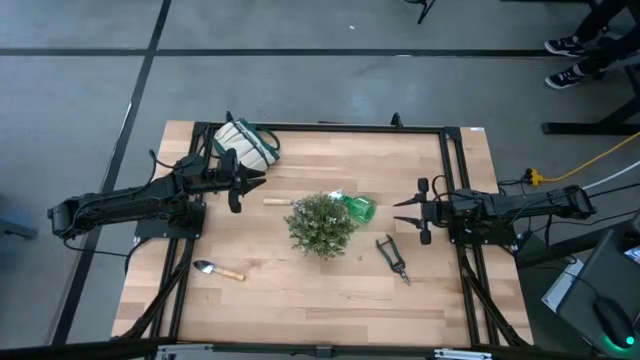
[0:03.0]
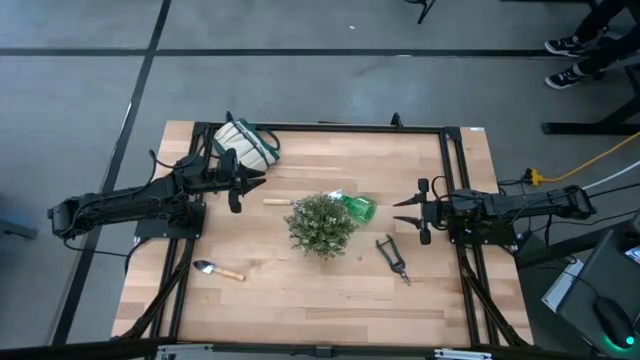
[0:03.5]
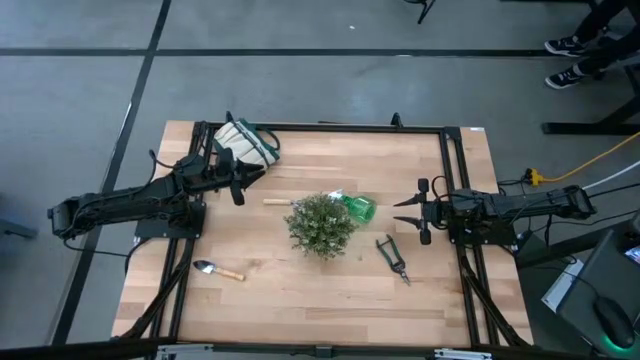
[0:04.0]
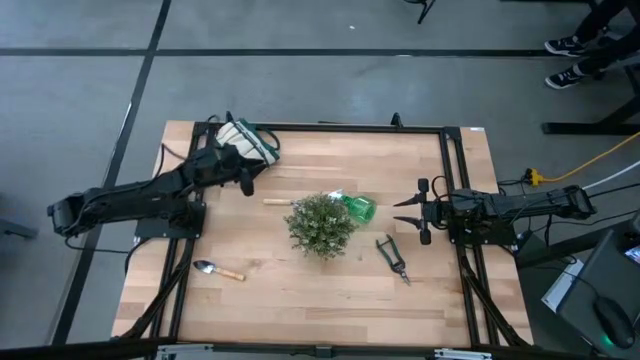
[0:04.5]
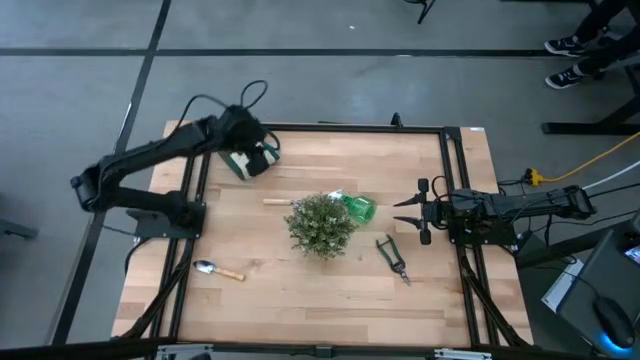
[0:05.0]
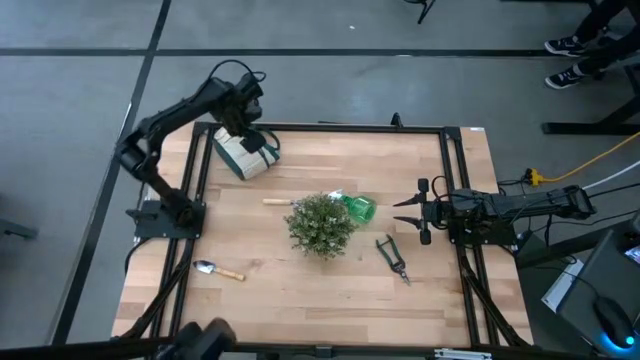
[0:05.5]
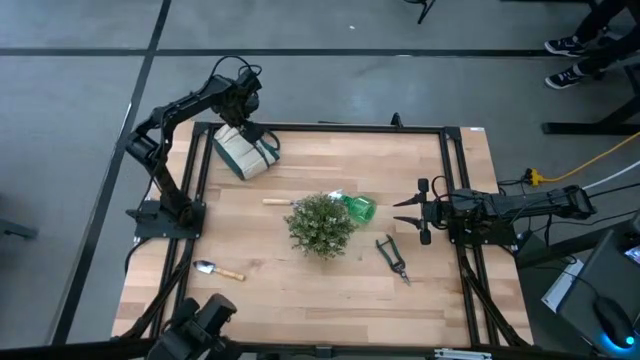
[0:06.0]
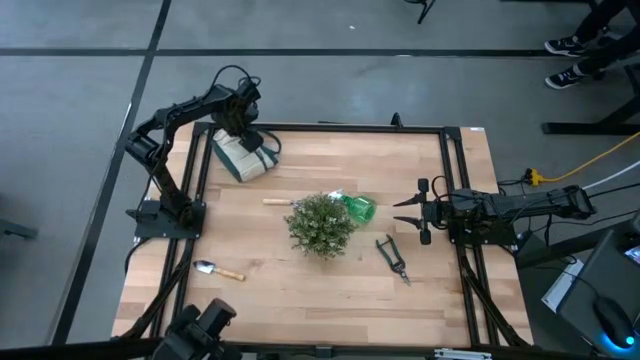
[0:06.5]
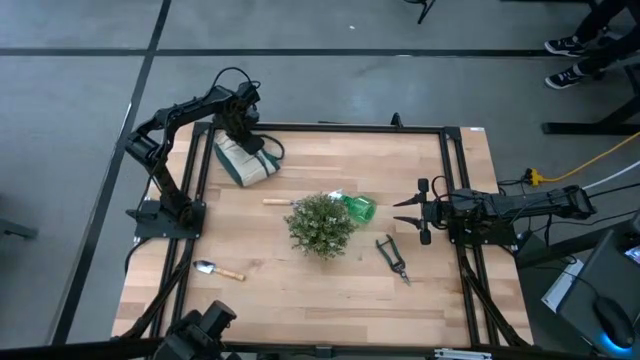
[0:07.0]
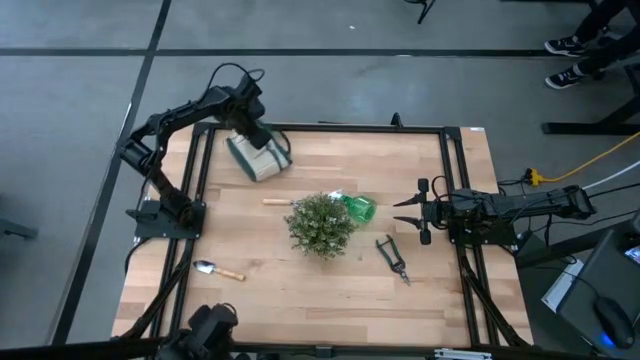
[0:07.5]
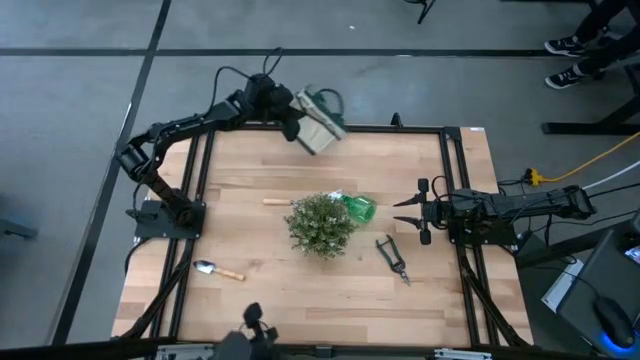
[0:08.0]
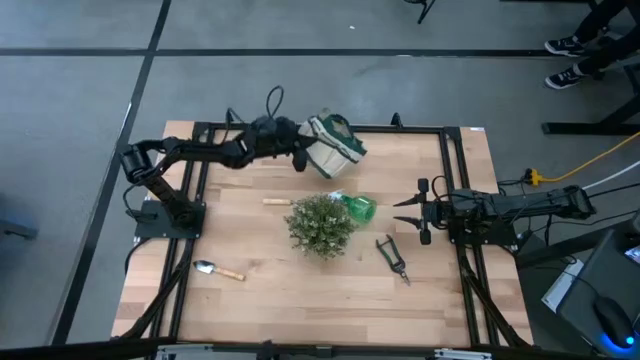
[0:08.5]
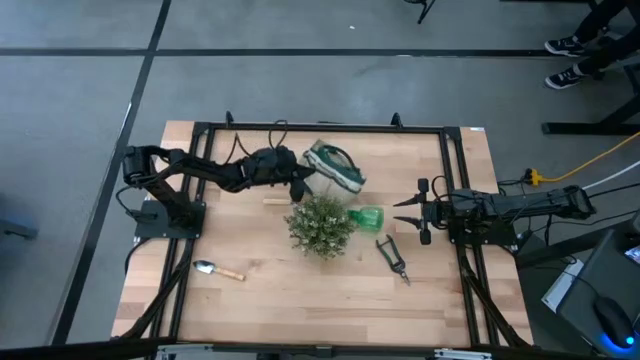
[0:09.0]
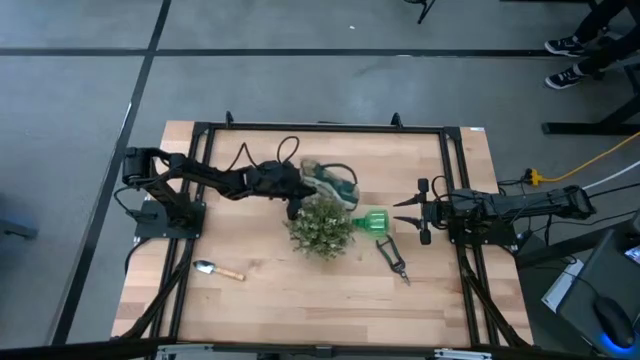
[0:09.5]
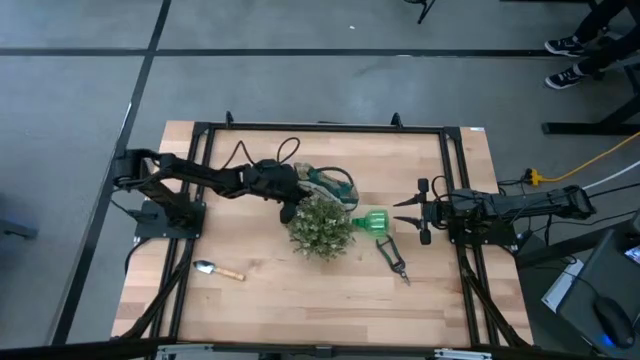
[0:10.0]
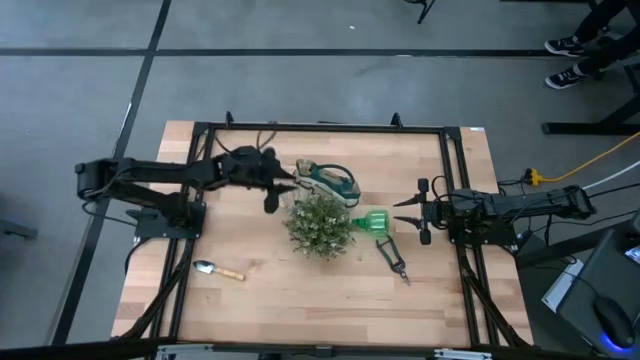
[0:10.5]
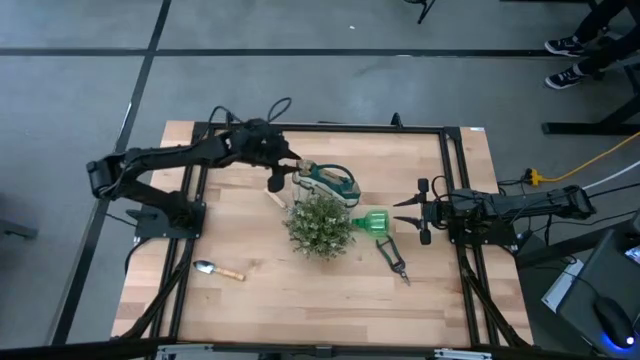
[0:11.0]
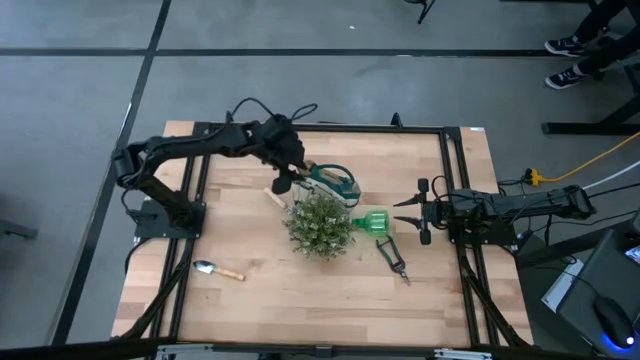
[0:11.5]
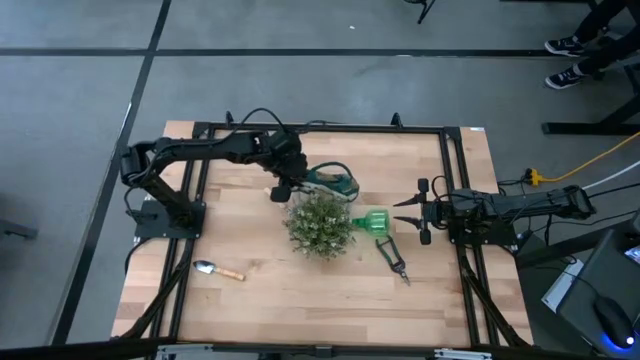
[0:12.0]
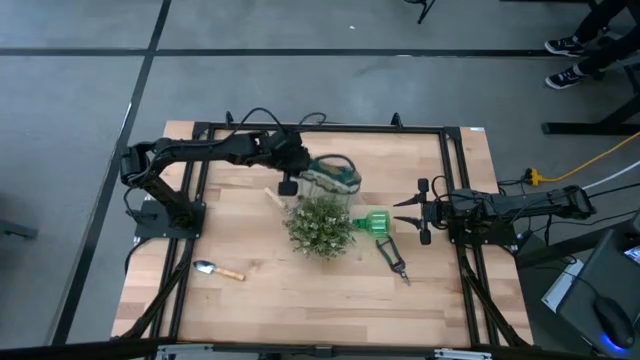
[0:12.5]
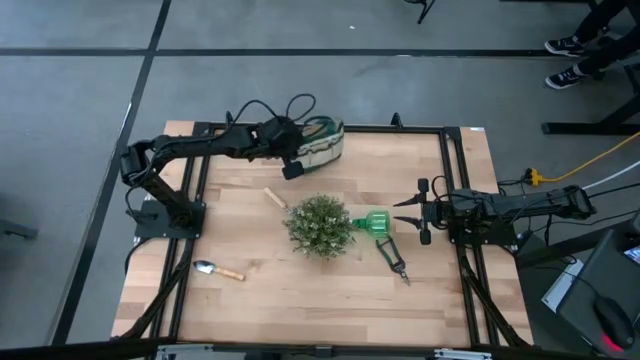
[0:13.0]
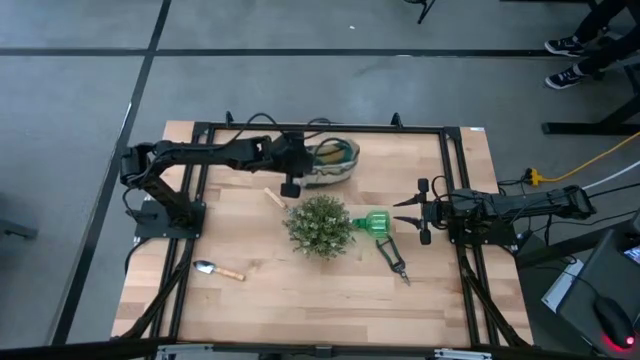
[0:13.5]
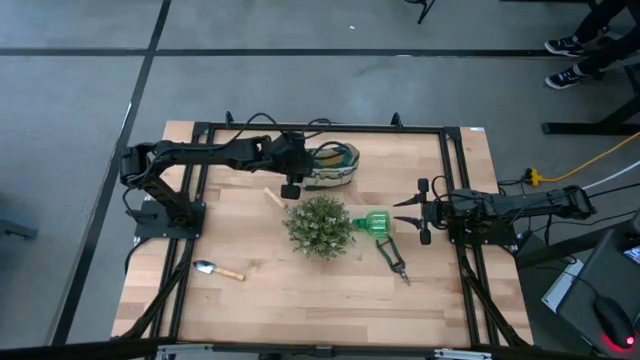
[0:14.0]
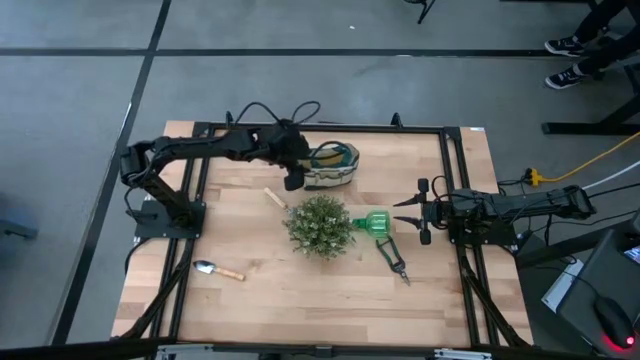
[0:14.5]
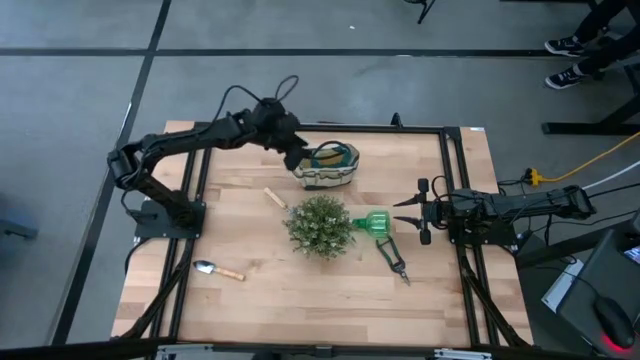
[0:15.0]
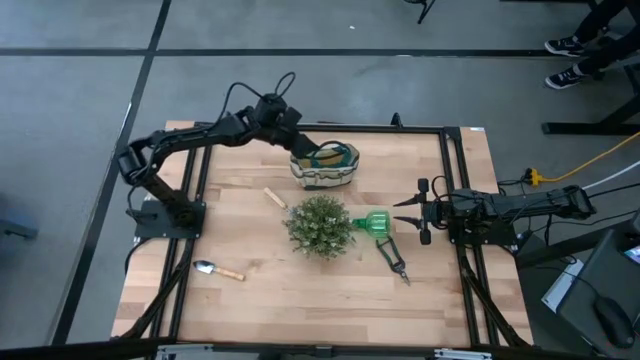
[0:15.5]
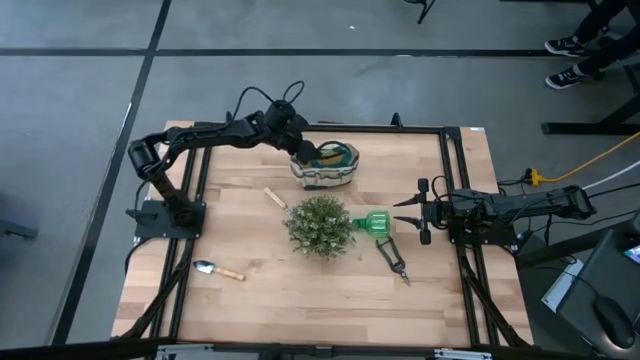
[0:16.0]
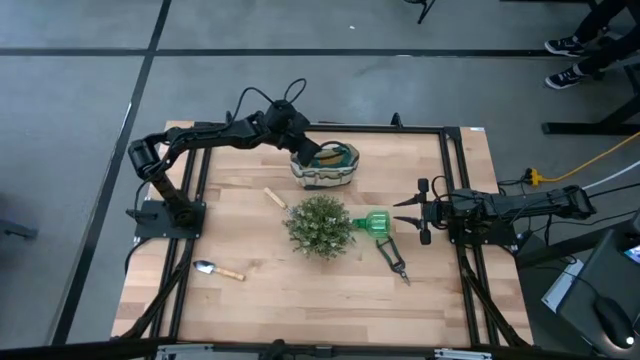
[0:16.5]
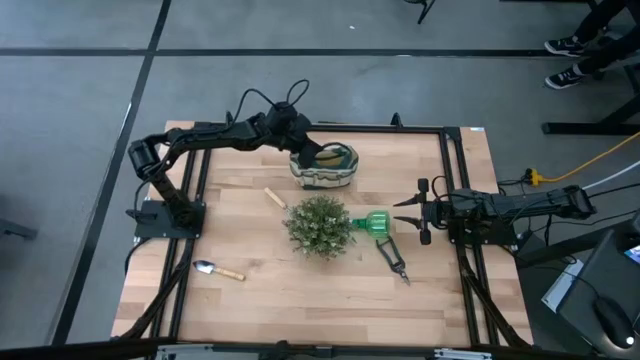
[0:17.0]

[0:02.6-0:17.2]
Task: Pick & Place Garden tools in Gardening bag
Prepare the green green gardening bag

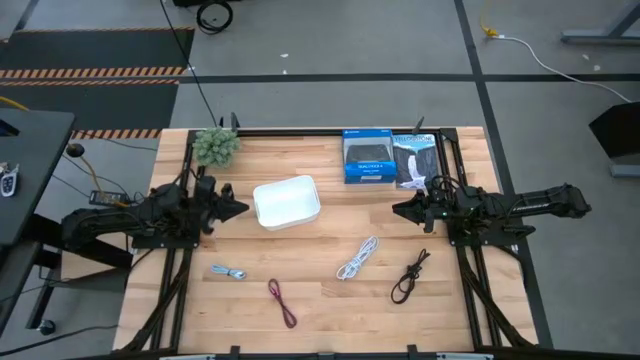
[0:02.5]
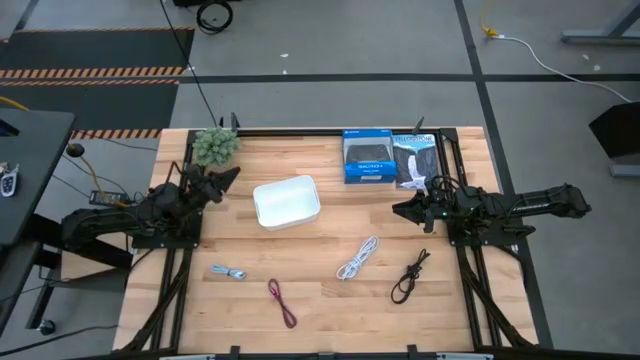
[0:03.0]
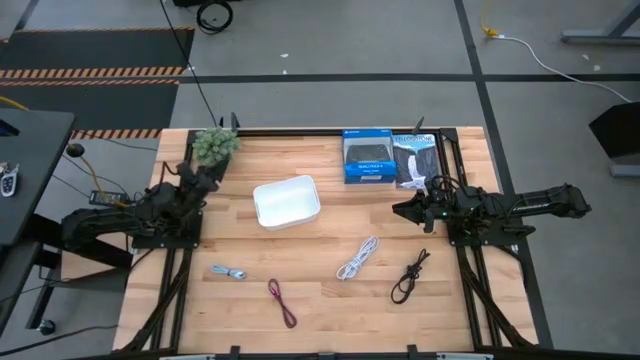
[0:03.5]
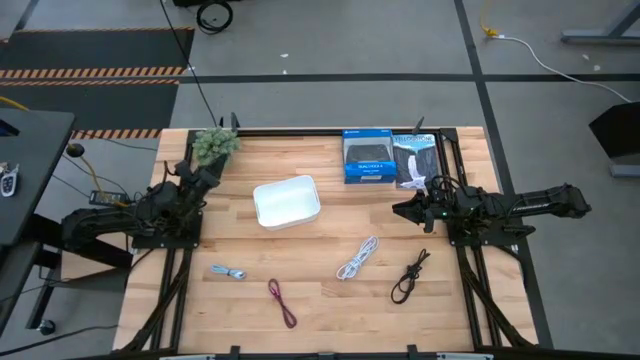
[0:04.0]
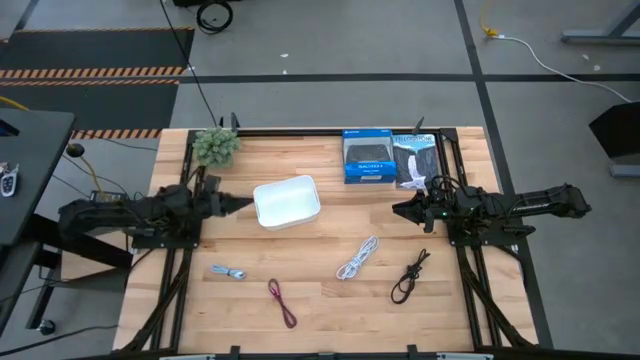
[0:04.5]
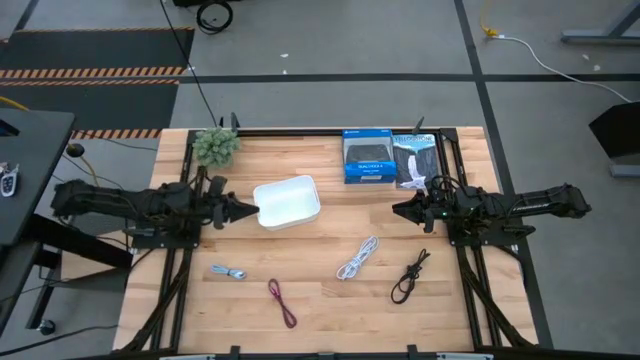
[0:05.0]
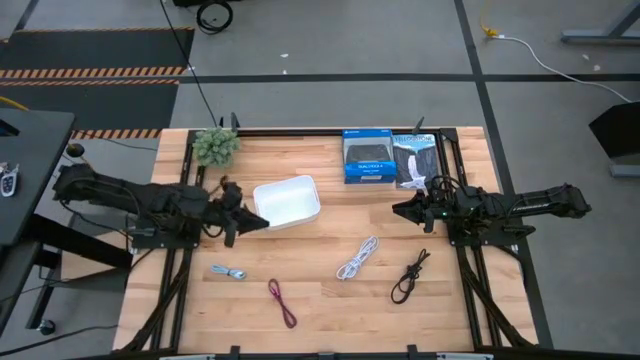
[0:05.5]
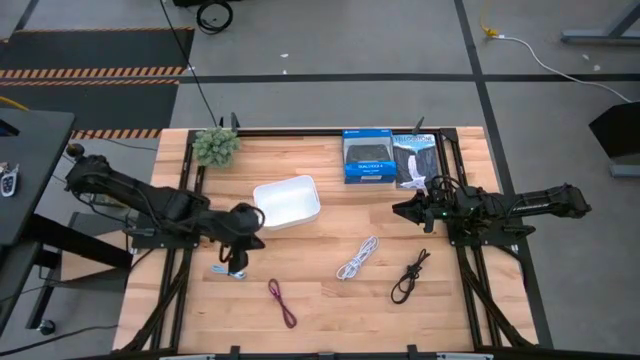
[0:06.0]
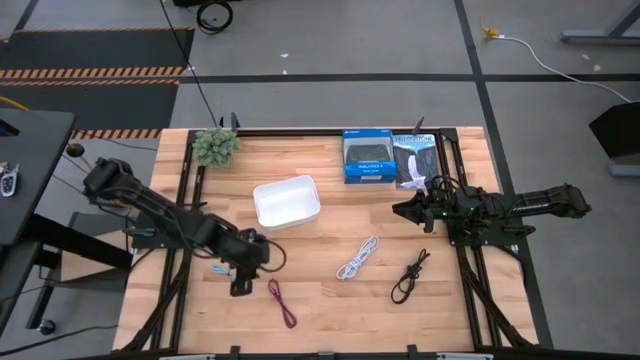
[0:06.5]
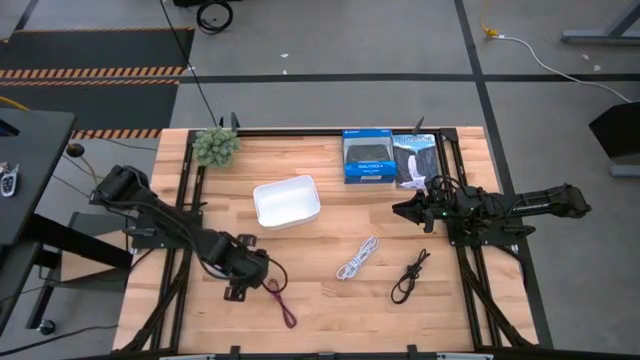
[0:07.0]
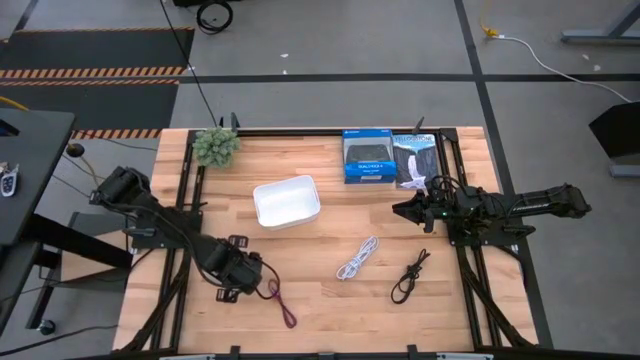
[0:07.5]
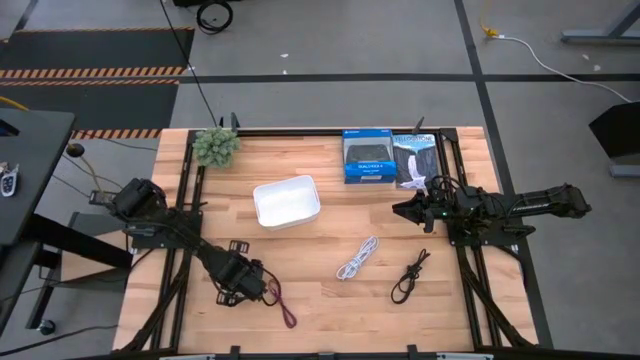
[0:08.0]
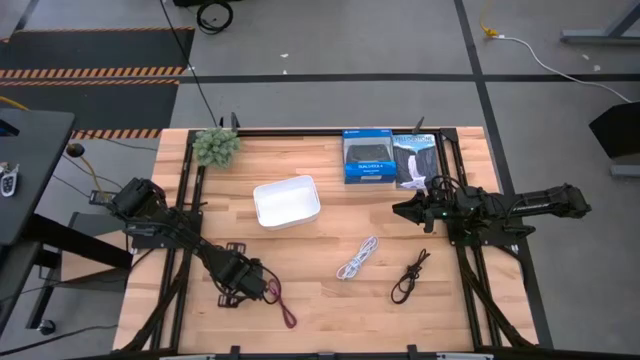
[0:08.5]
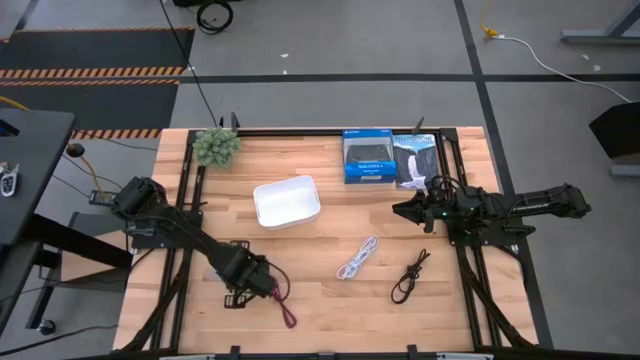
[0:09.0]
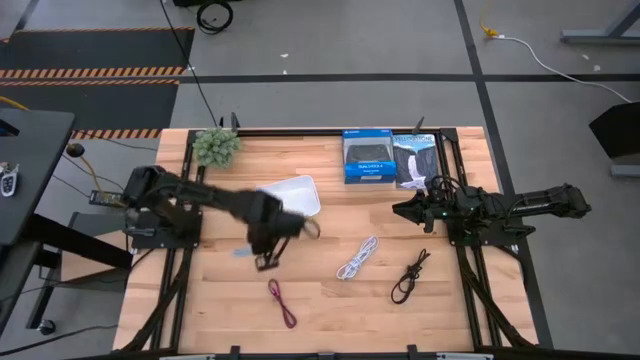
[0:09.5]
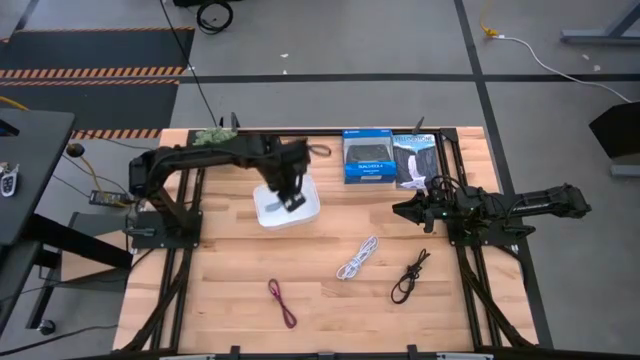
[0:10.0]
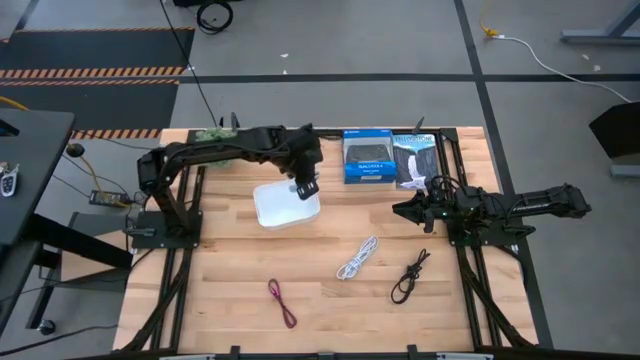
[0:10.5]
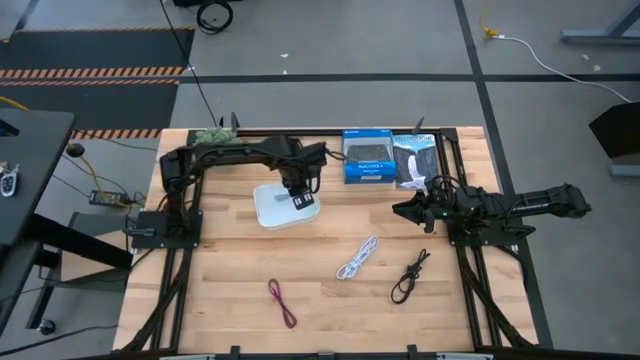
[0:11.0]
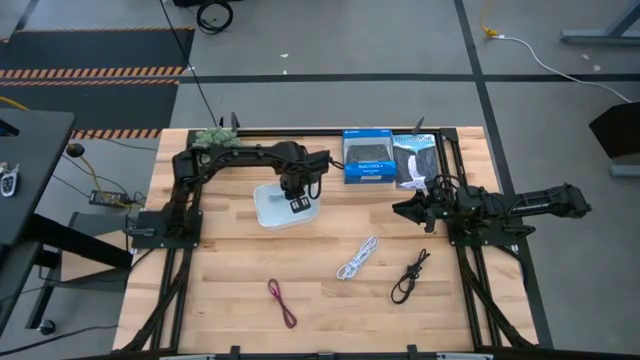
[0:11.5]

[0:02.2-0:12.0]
Task: Pick and place USB-C Cables
Put the light blue cable charger into the white bin
